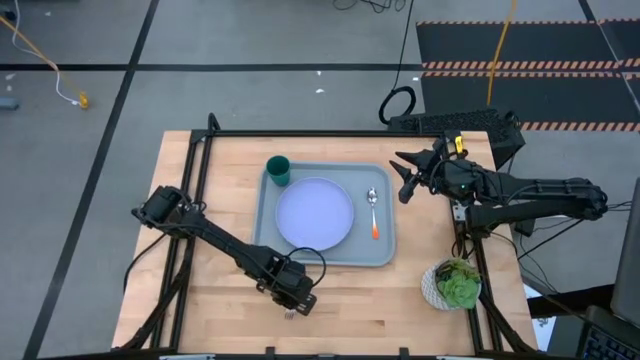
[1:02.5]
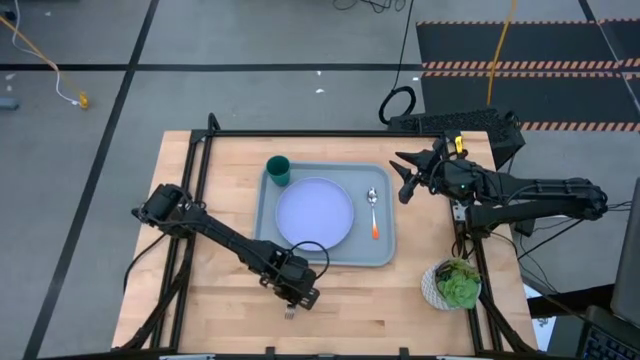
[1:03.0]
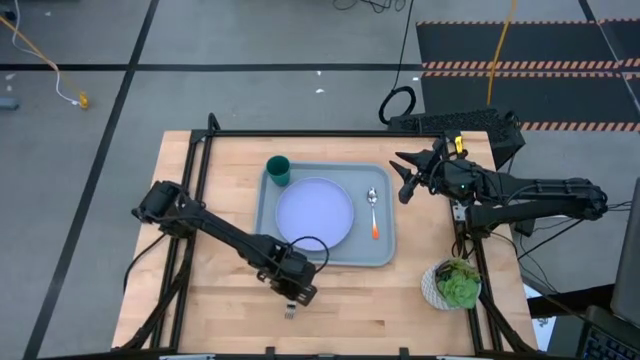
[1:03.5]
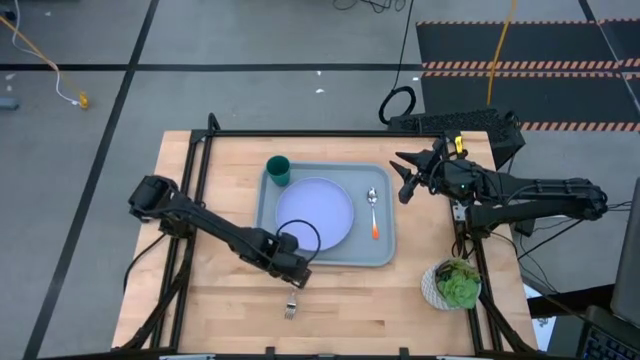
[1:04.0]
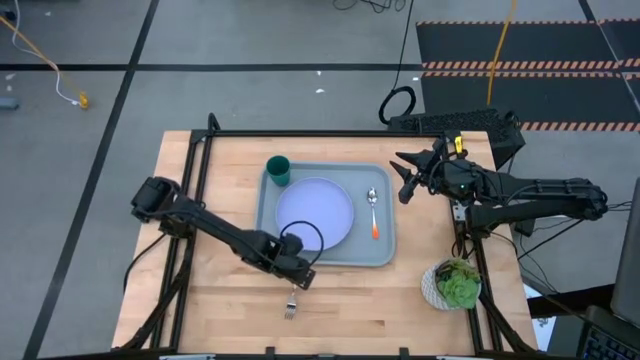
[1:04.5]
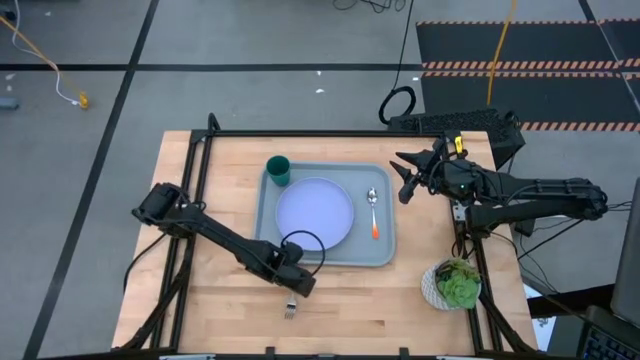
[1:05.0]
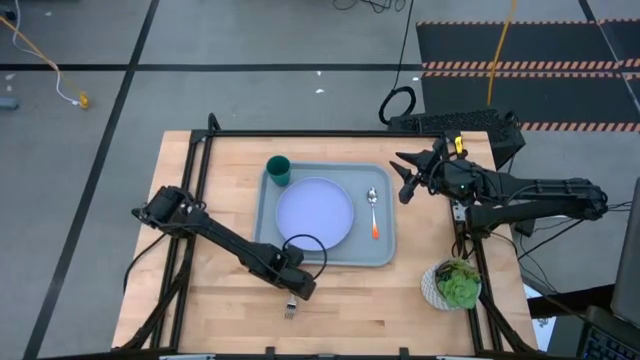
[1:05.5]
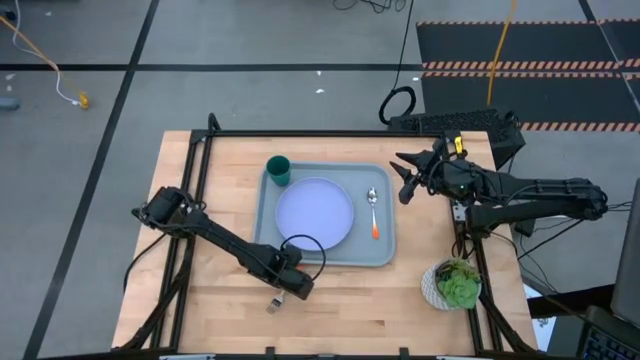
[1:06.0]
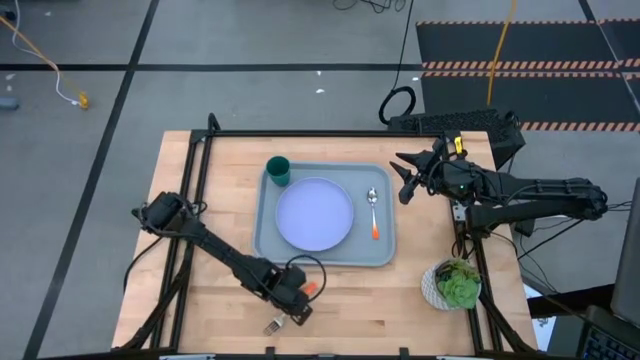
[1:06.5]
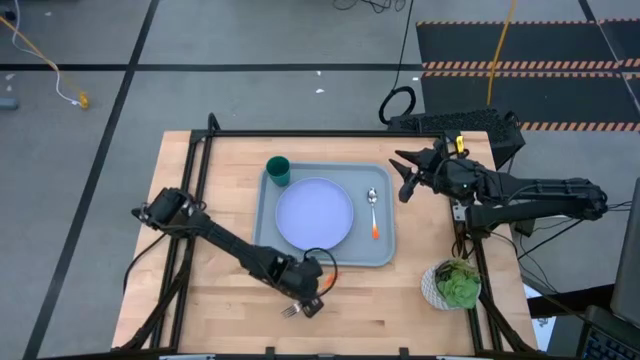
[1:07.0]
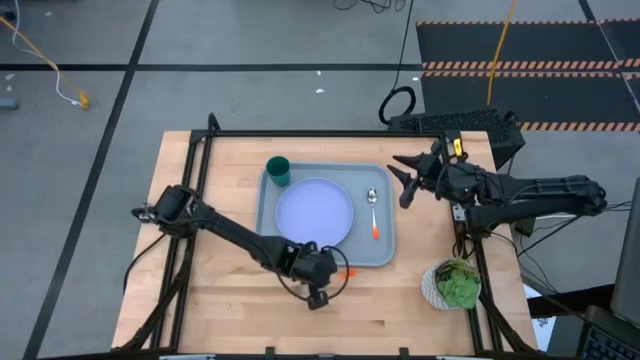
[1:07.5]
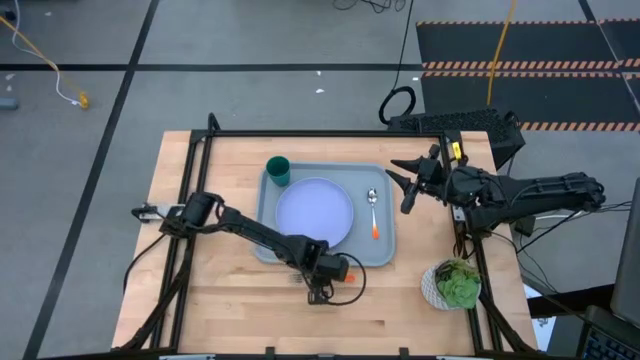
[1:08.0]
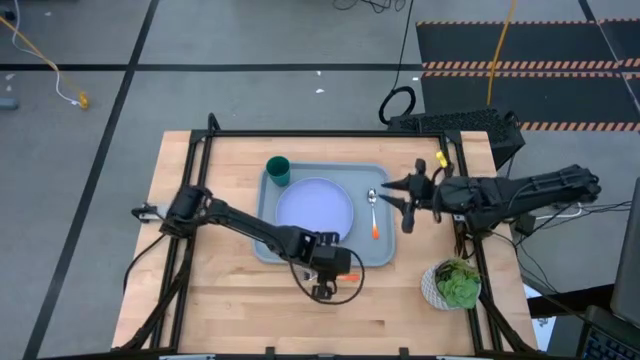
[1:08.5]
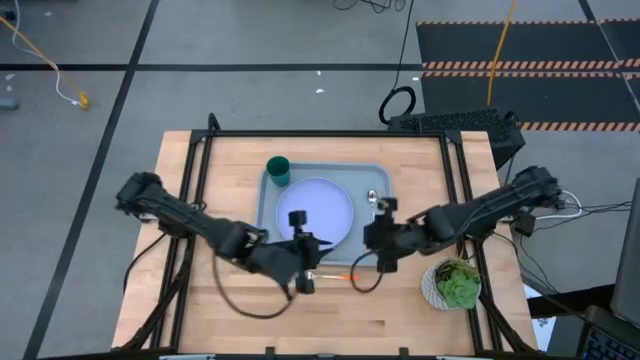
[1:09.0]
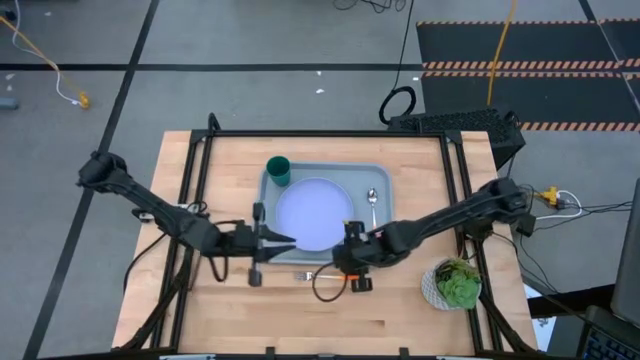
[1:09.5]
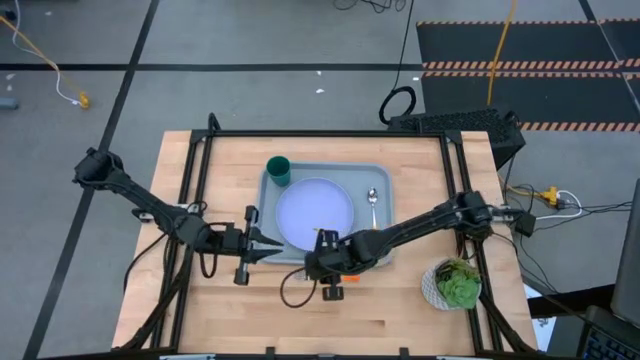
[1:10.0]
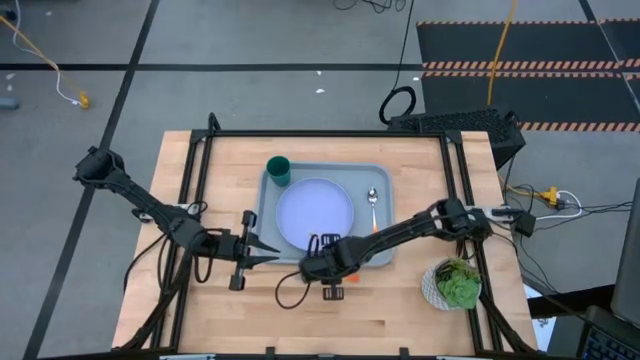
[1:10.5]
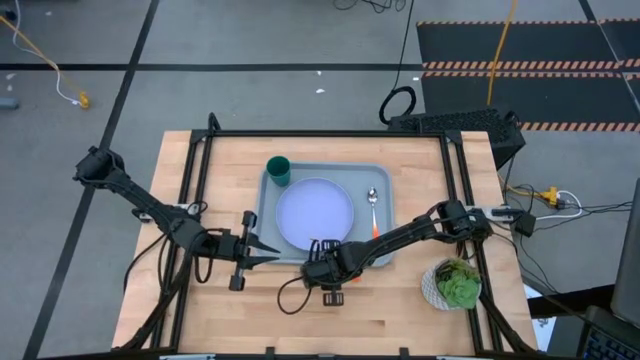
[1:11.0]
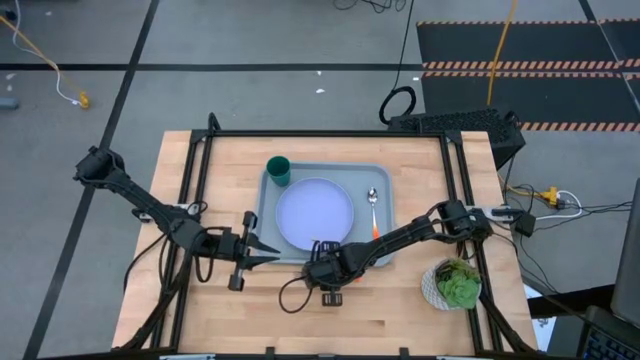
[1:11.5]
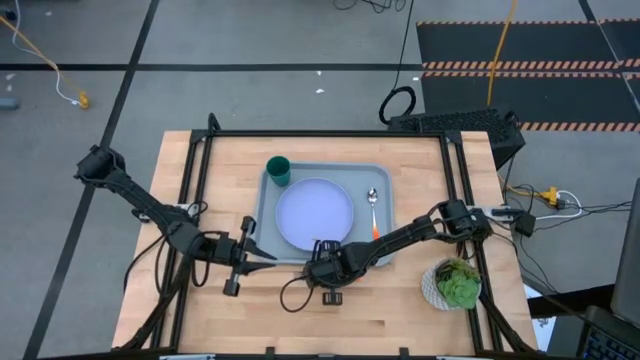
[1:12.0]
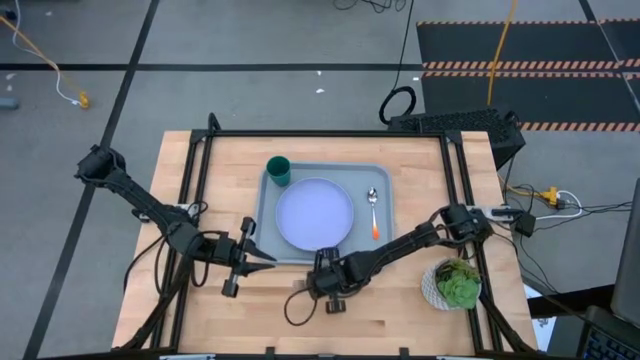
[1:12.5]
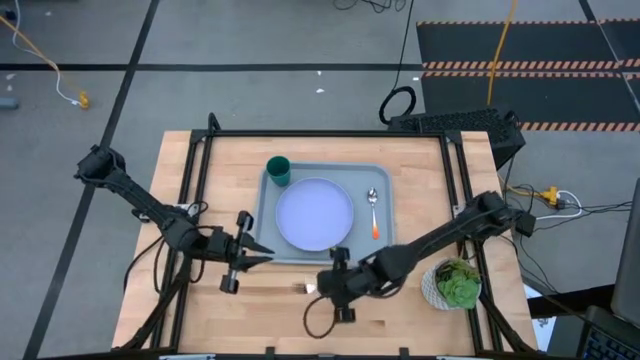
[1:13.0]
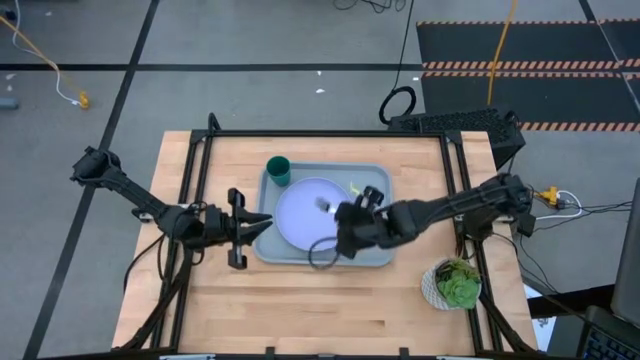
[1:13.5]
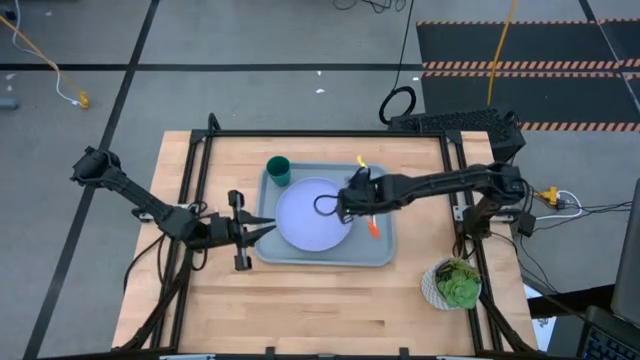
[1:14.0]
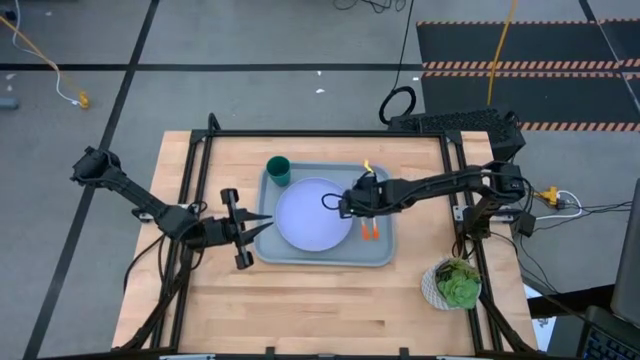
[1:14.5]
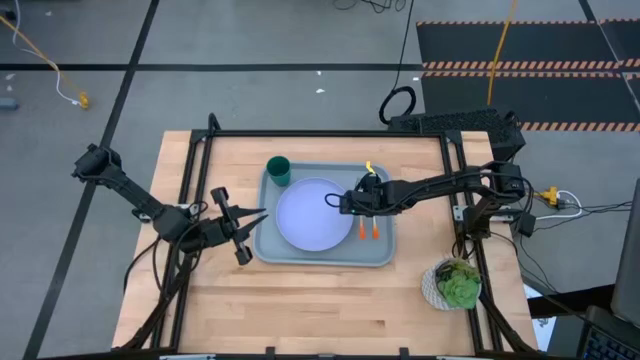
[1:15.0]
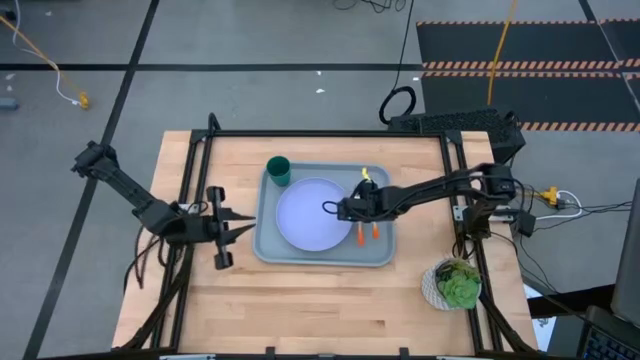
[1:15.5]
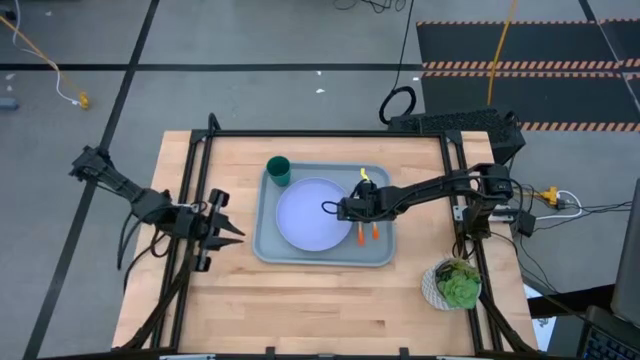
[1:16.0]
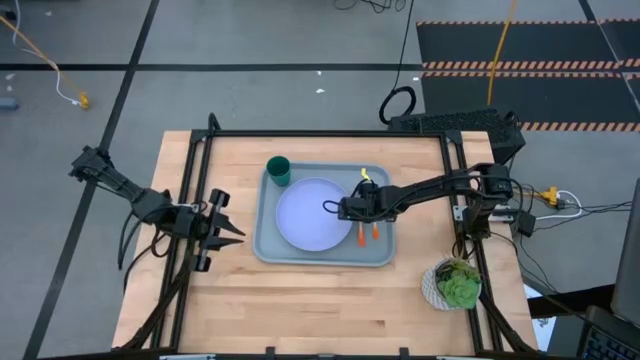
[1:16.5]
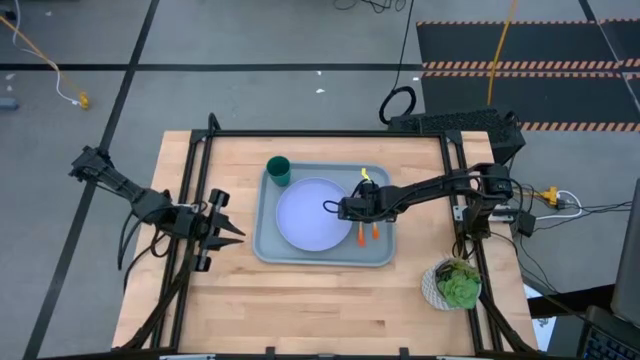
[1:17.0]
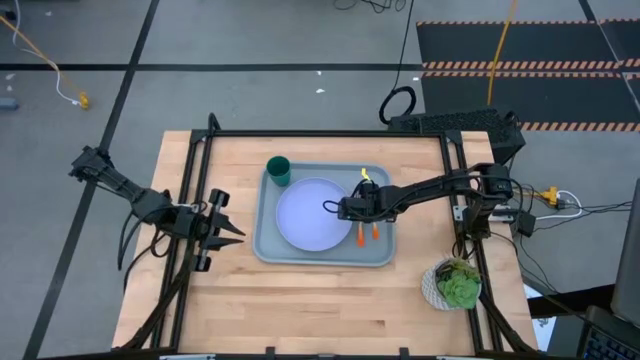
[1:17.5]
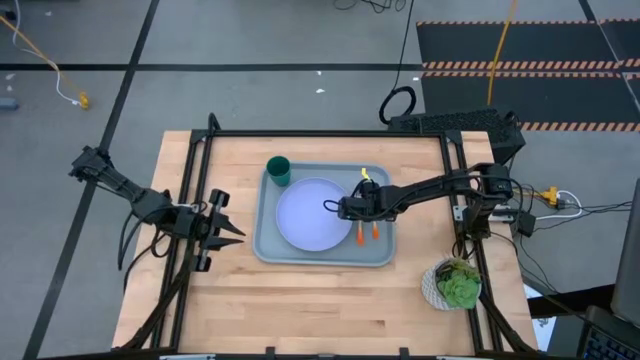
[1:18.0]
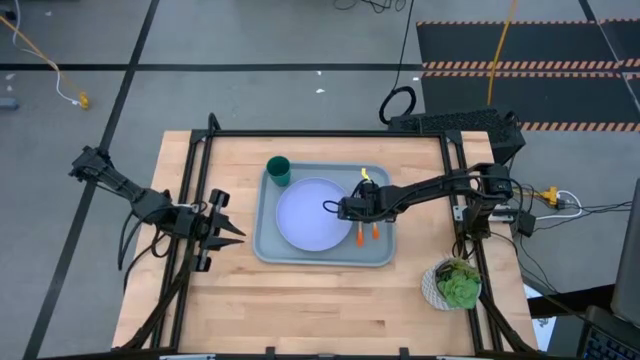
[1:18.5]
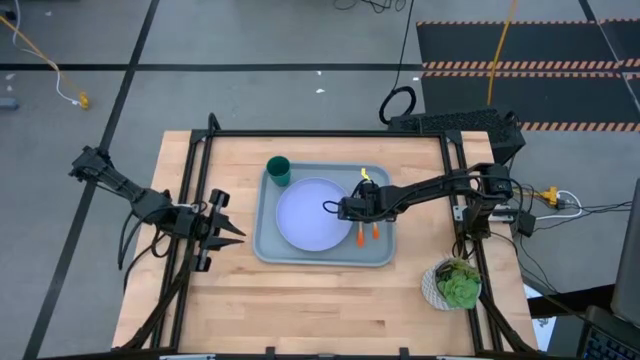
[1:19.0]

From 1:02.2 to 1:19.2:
Task: Pick and place plate/cup/fork/spoon on tray
Put the orange fork on the gray serving tray in between the violet plate and orange spoon

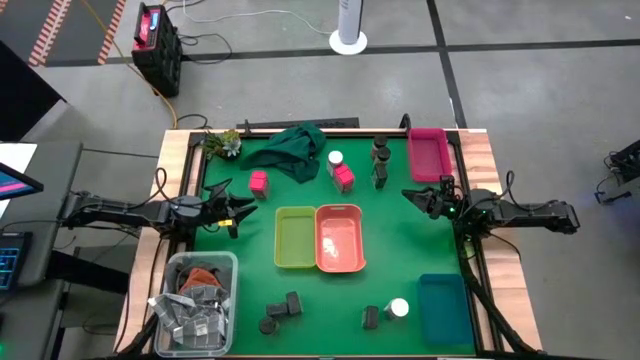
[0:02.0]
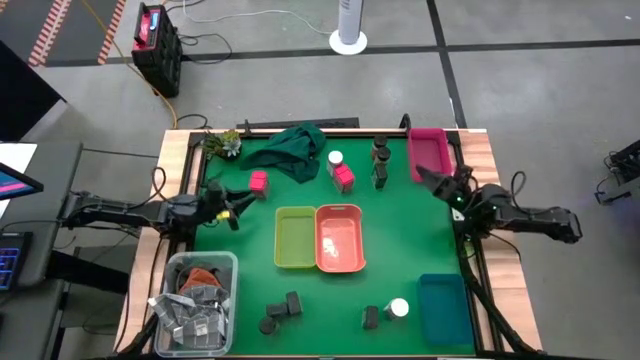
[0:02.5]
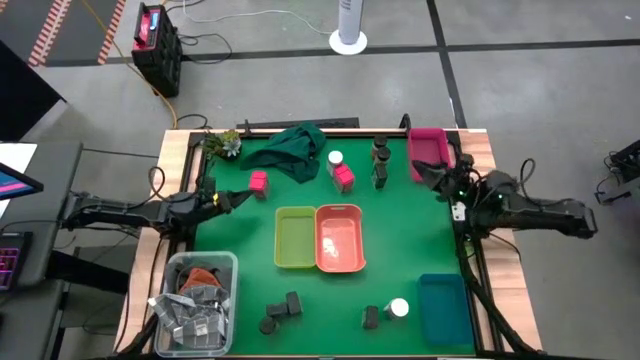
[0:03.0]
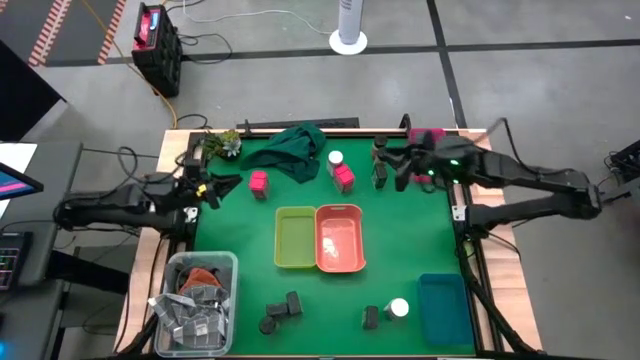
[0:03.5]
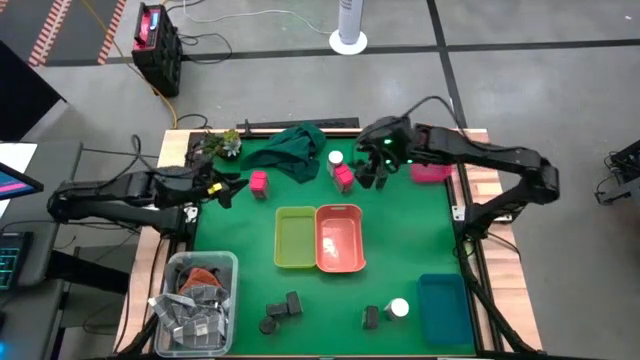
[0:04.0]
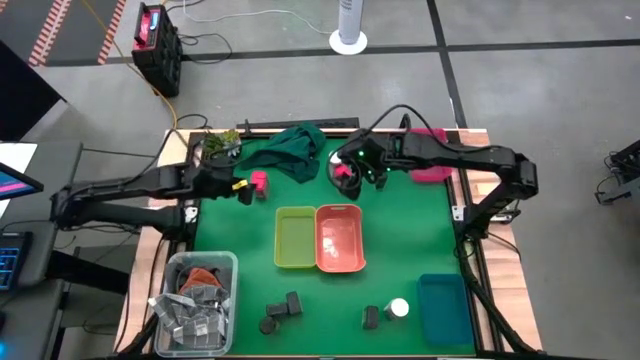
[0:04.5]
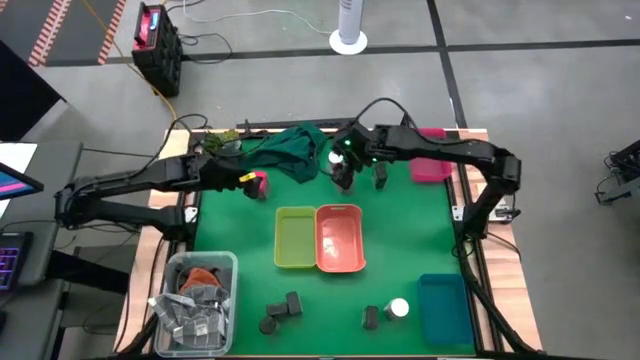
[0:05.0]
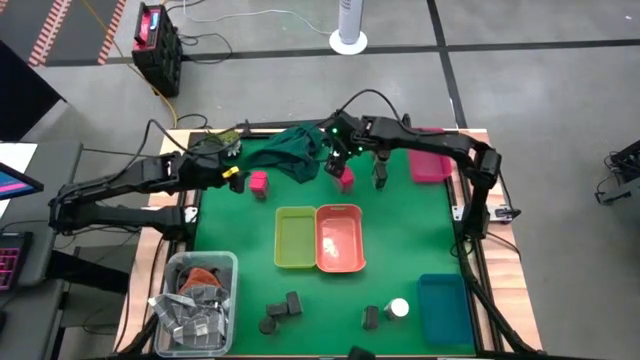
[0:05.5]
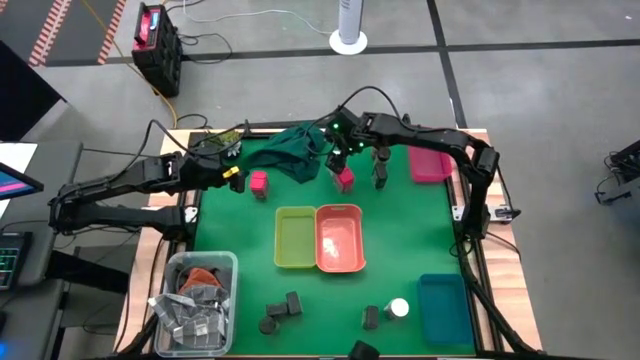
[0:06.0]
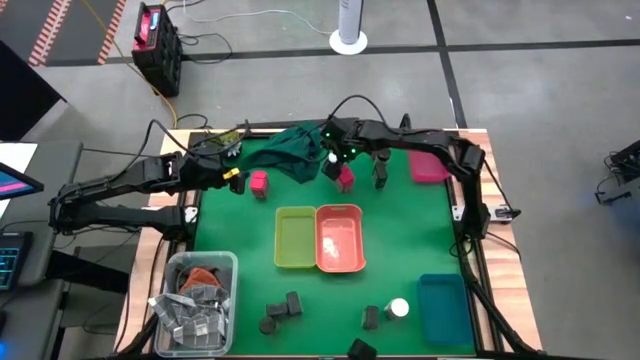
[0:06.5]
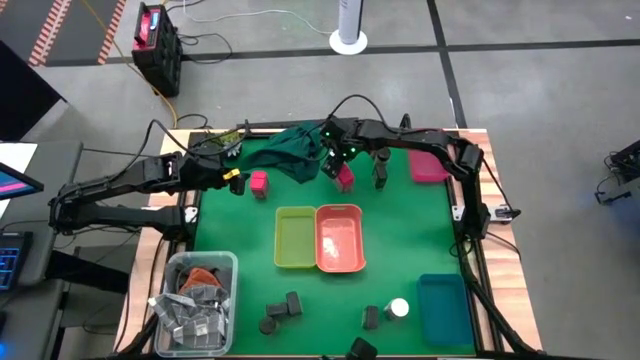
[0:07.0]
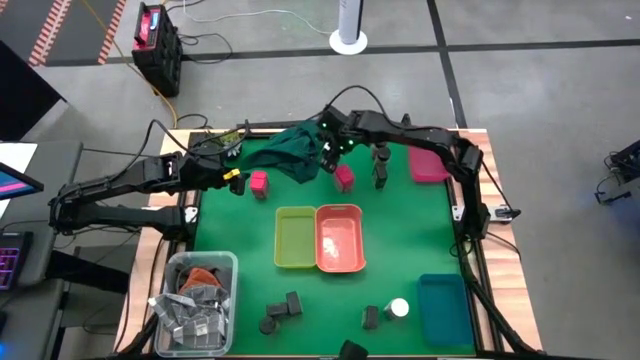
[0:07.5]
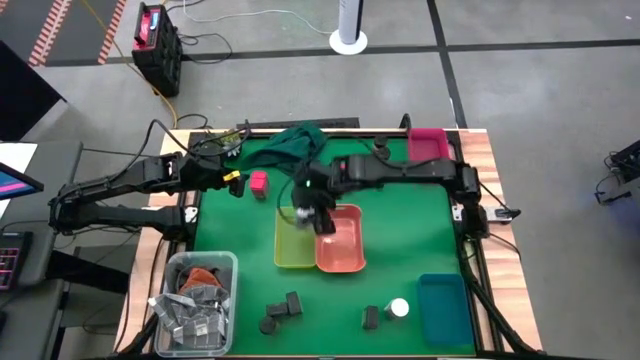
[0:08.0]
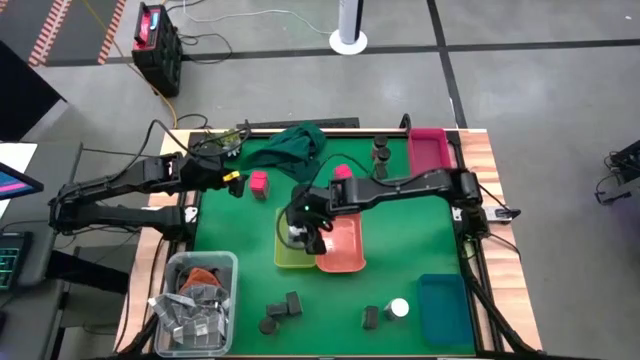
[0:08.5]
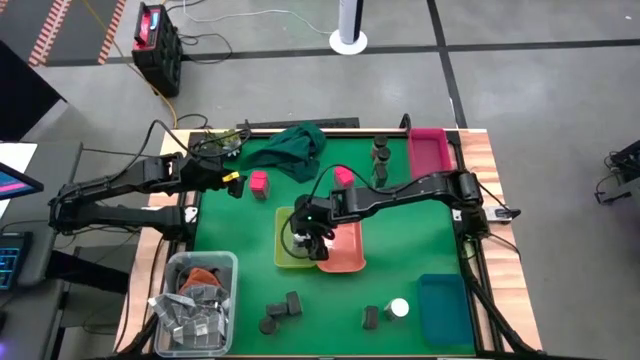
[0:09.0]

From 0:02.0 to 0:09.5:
Task: Sort spices by type
Put the top white seasoning bottle into the green bin
